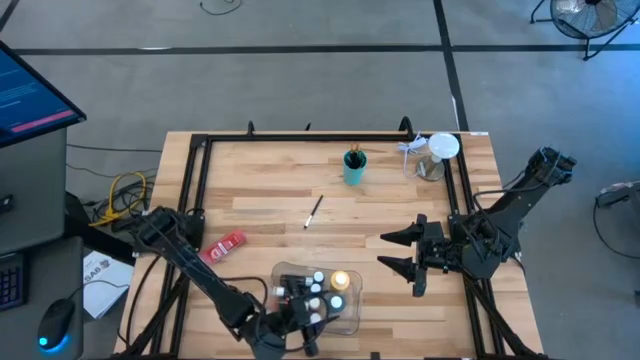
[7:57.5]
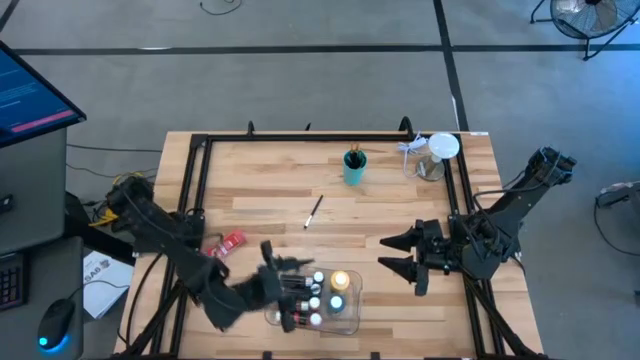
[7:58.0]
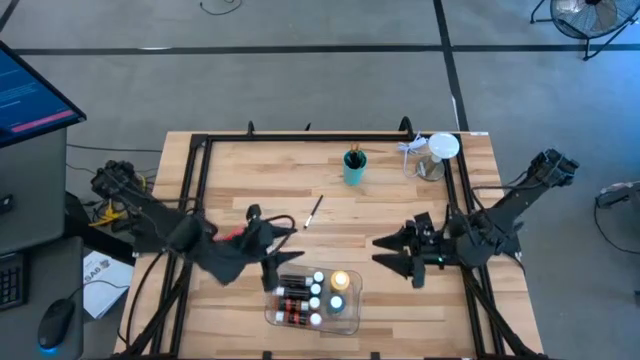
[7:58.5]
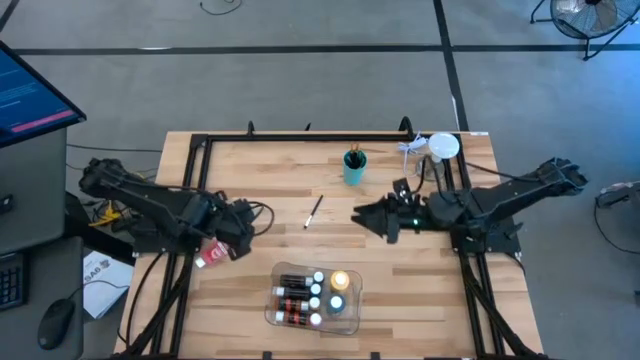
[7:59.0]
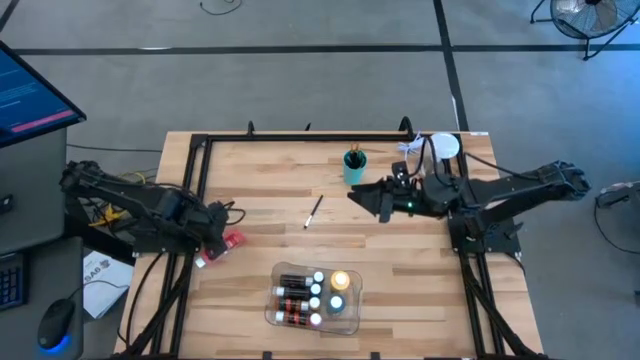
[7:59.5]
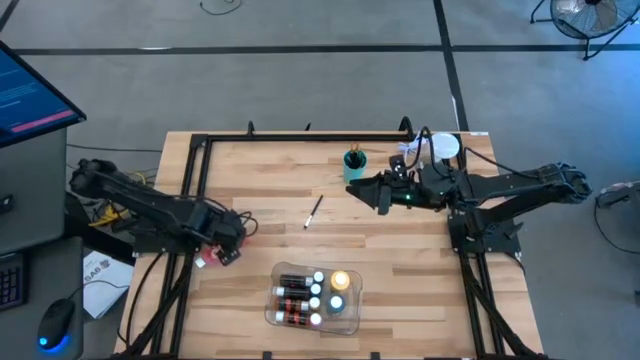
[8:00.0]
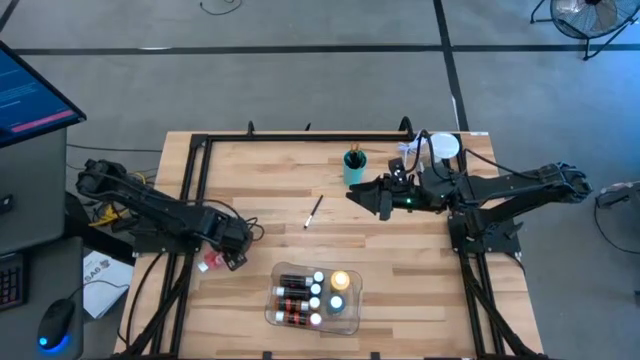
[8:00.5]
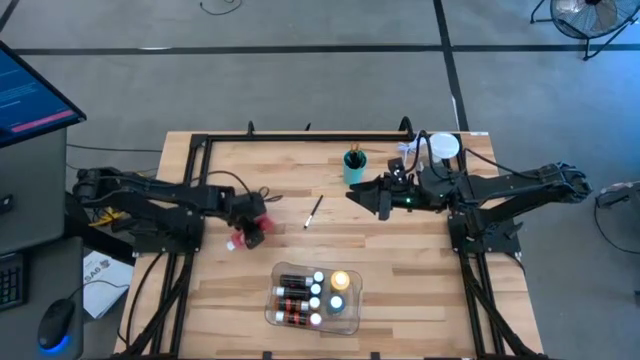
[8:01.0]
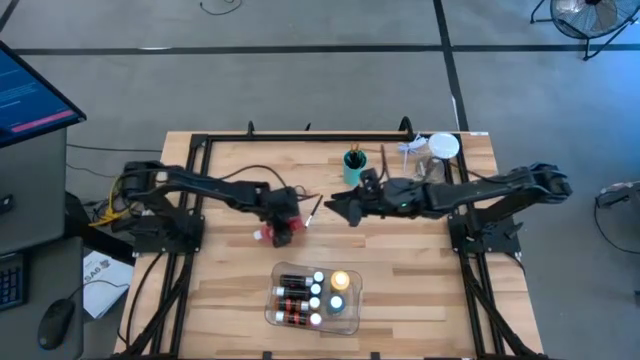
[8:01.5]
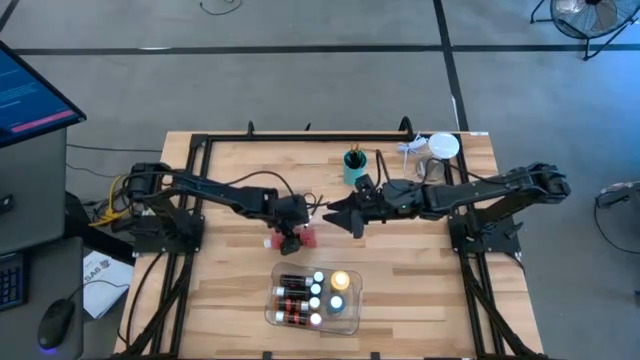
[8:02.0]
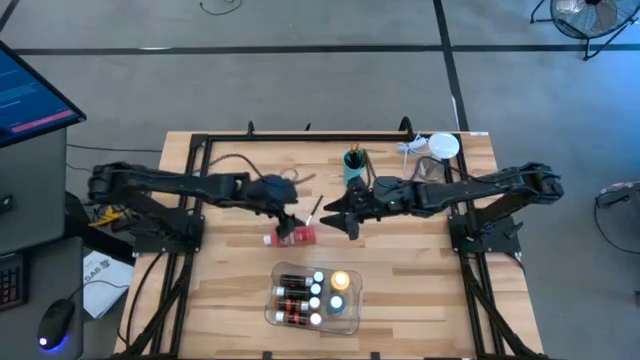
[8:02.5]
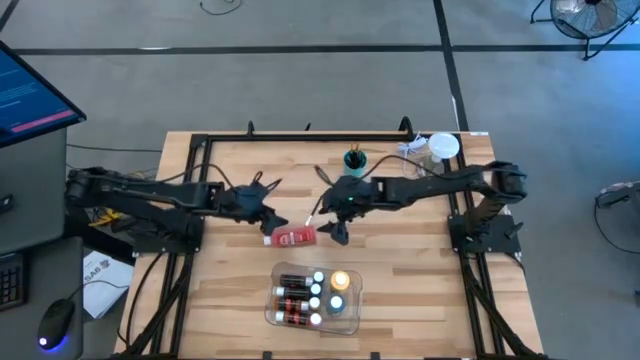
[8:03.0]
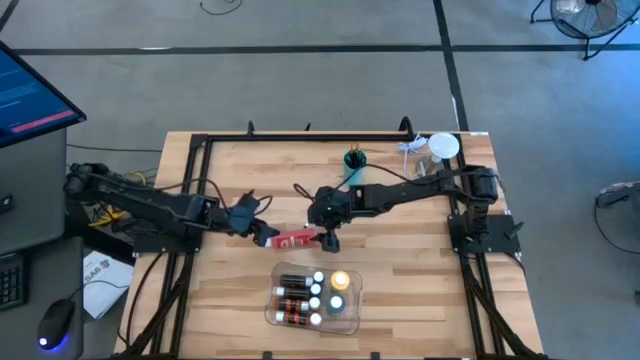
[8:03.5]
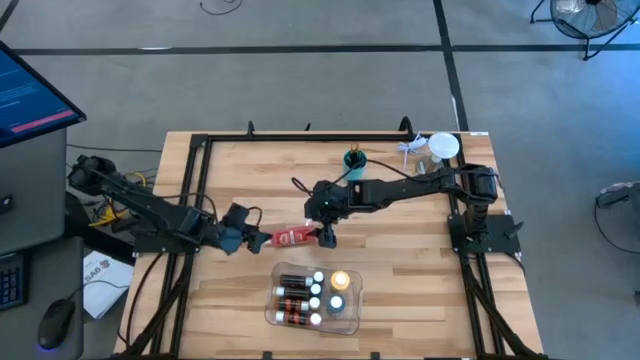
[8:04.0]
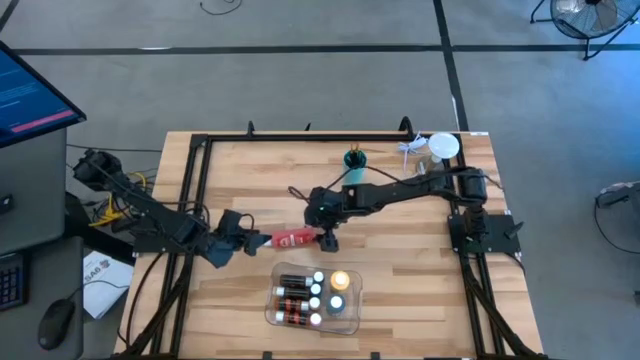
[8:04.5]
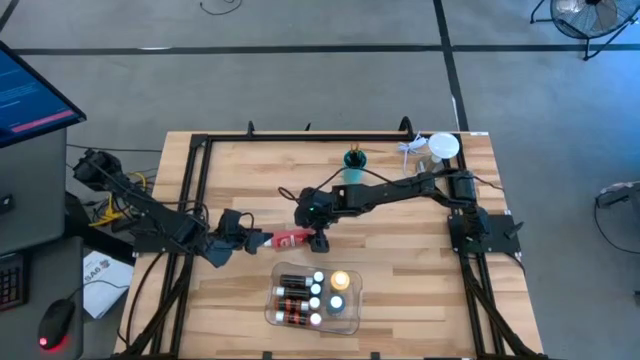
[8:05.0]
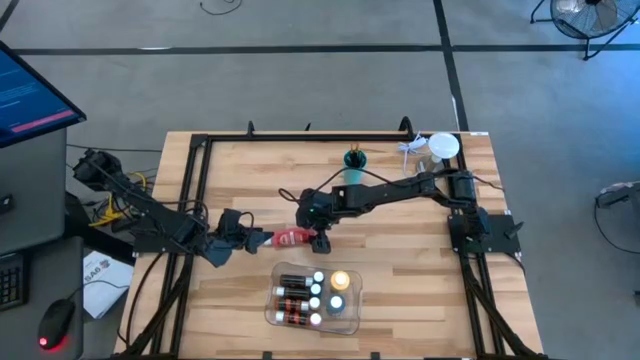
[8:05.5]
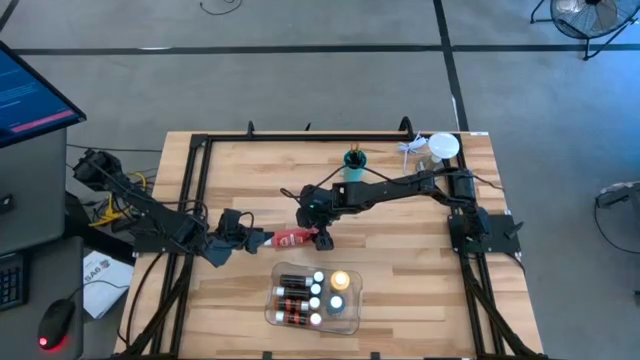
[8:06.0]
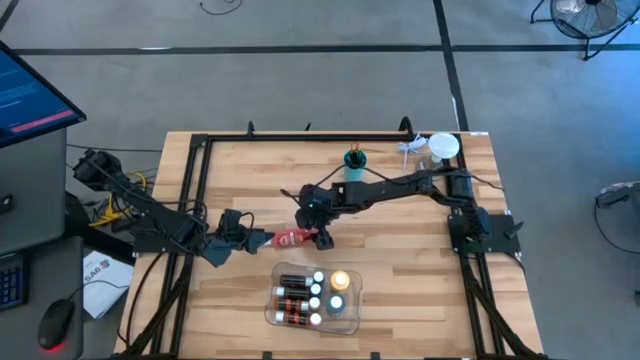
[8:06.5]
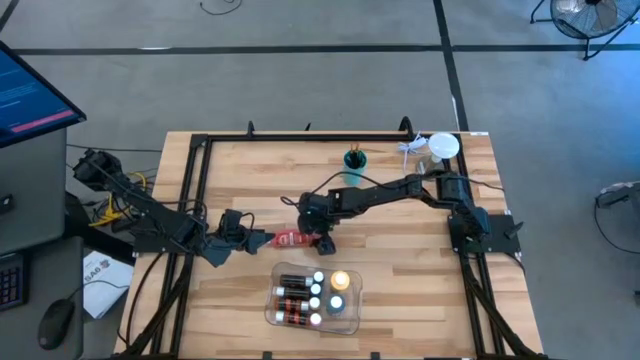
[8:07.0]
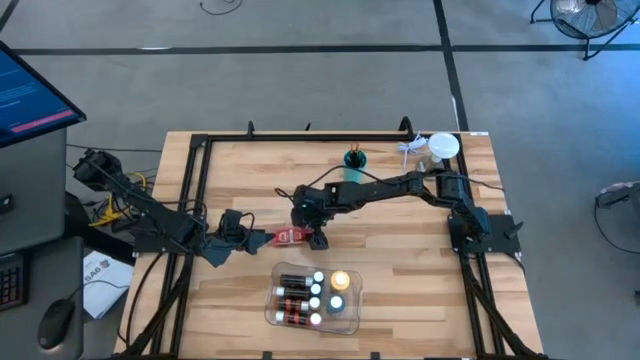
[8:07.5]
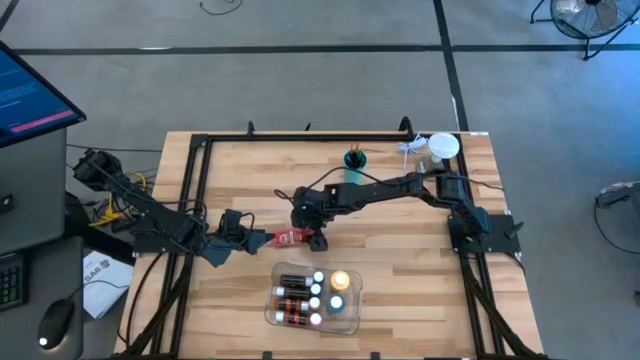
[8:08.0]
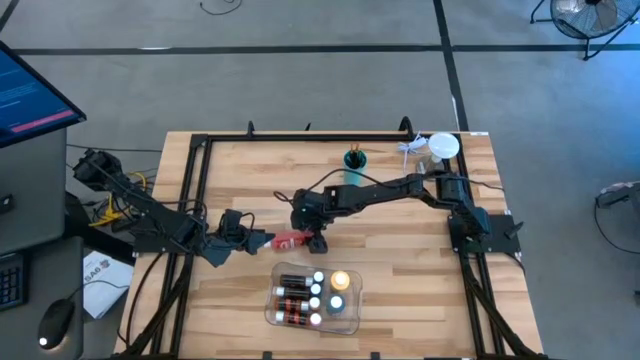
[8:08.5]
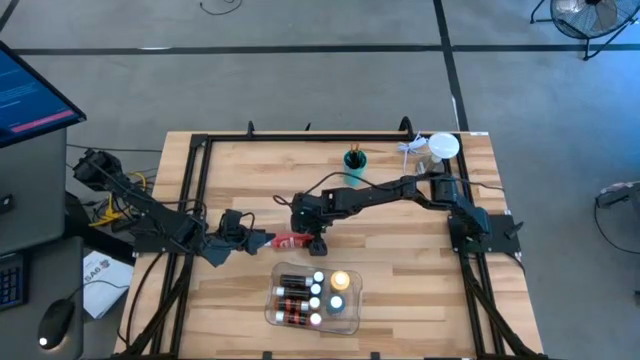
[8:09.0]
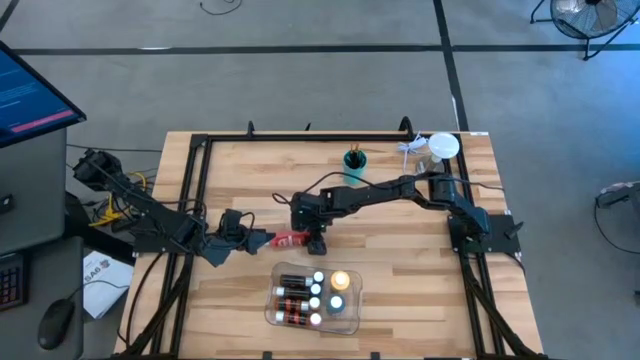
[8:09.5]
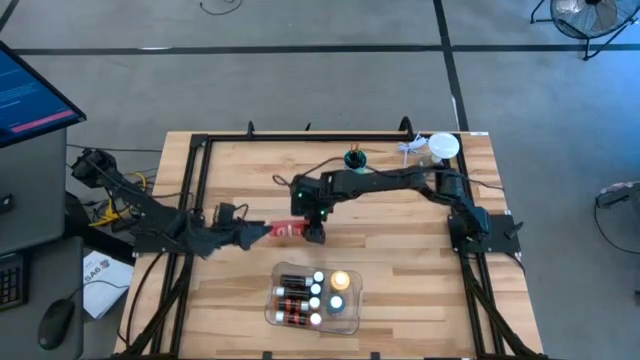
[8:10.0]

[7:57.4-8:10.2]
Task: Pick & Place Paint Supplies
Put the red paint bottle into the transparent bin

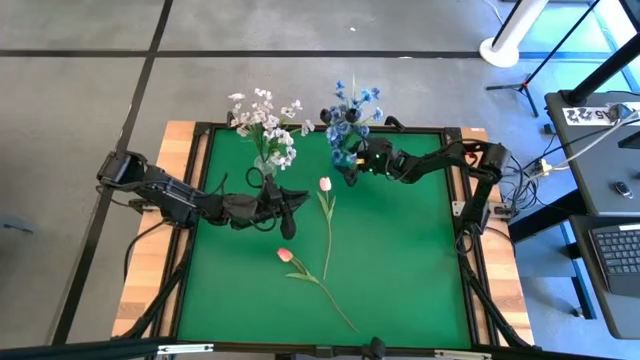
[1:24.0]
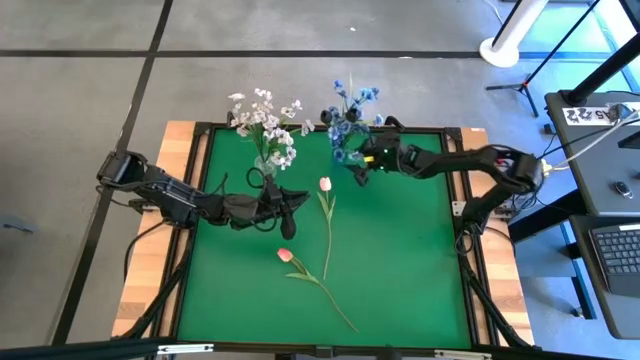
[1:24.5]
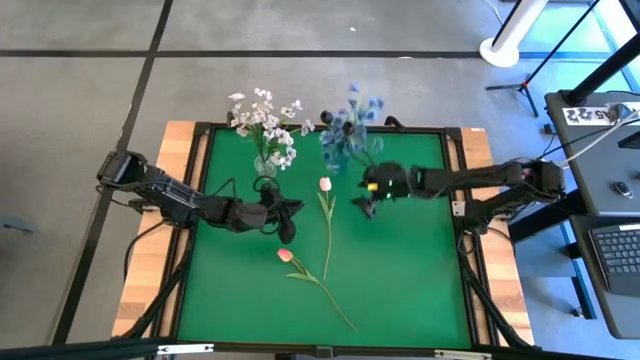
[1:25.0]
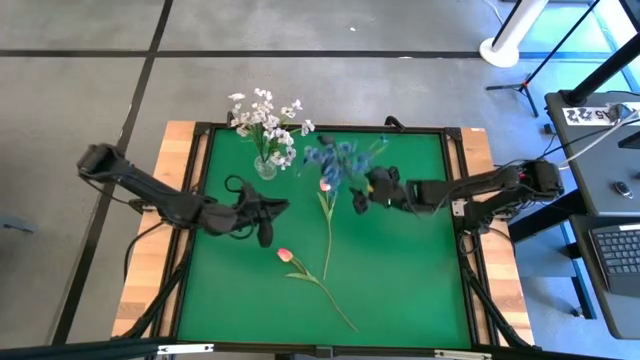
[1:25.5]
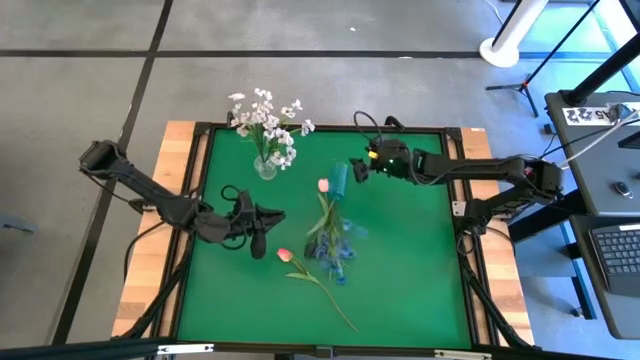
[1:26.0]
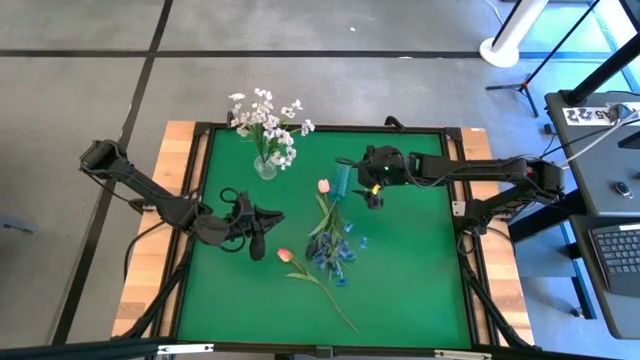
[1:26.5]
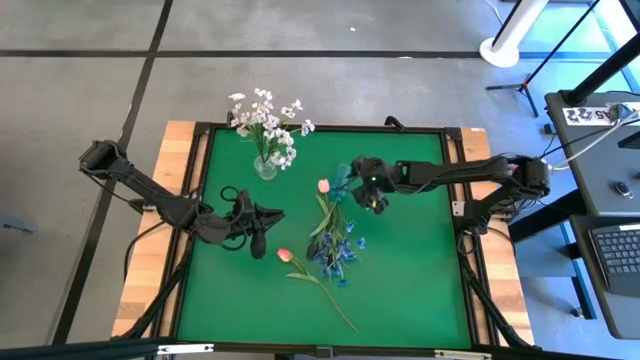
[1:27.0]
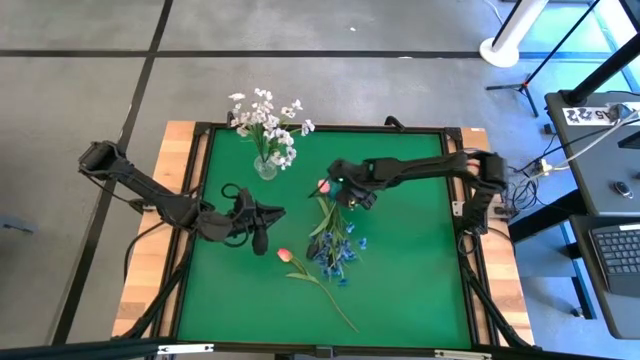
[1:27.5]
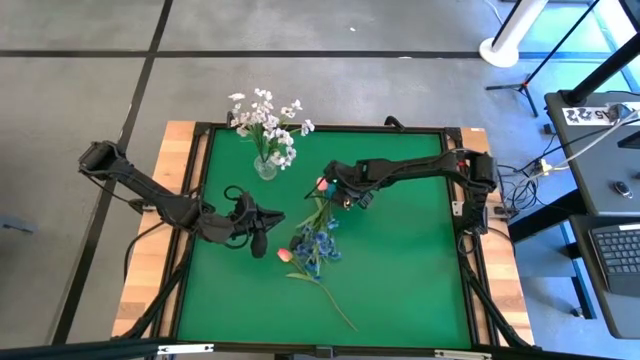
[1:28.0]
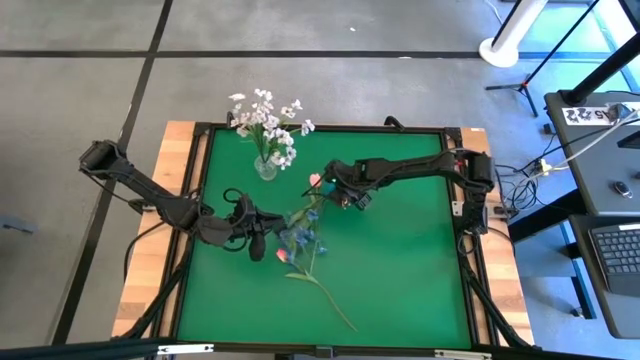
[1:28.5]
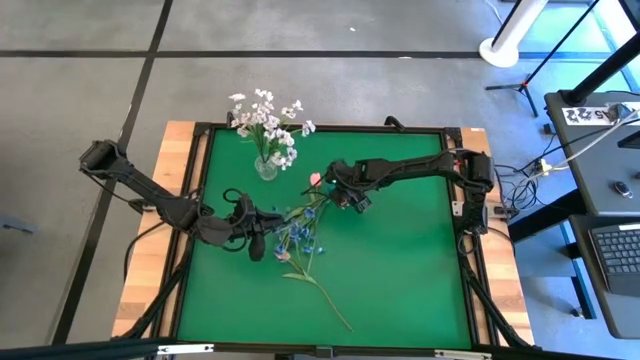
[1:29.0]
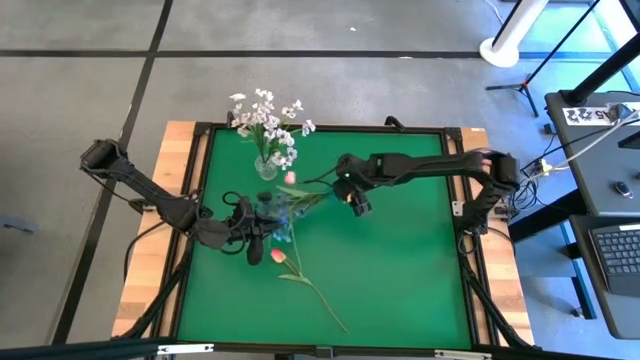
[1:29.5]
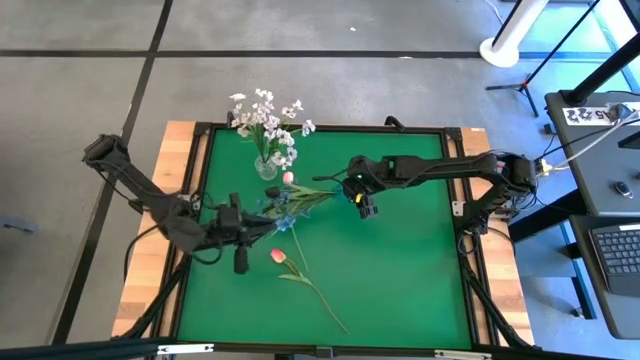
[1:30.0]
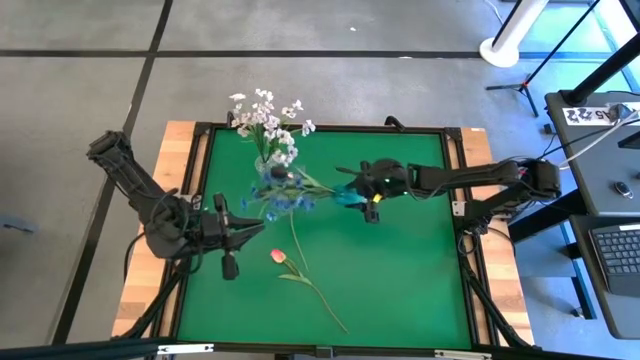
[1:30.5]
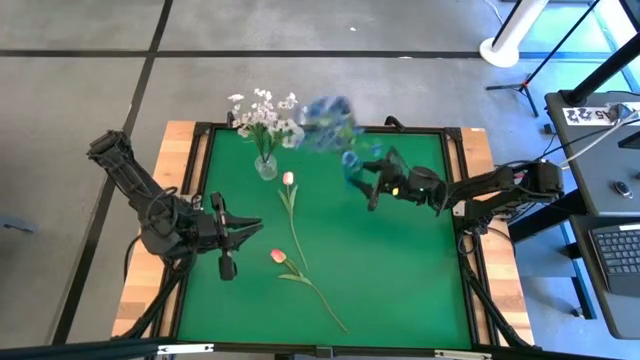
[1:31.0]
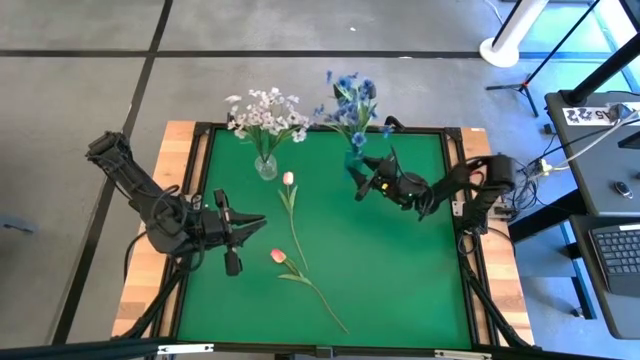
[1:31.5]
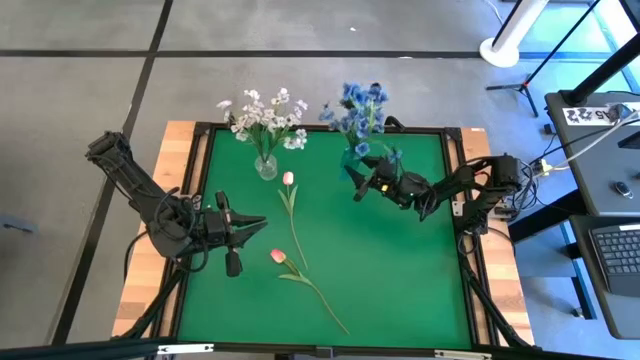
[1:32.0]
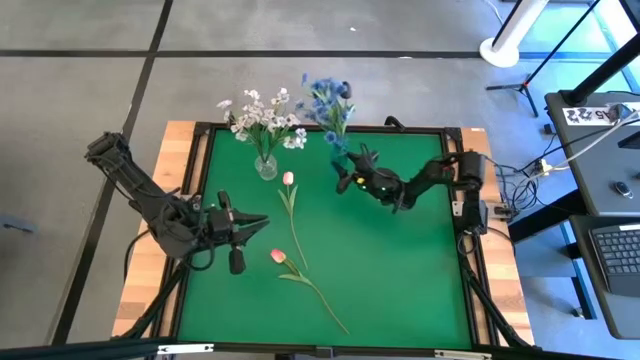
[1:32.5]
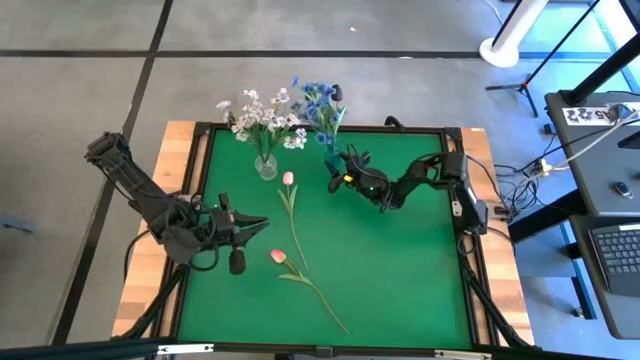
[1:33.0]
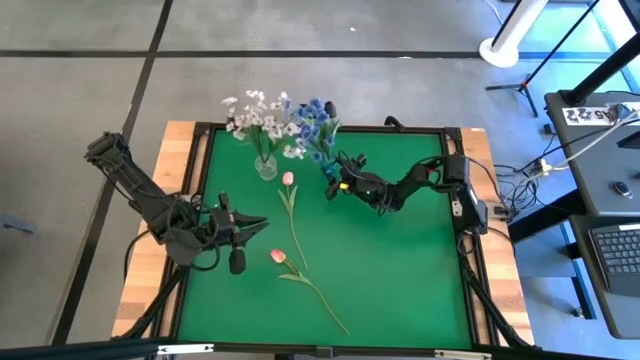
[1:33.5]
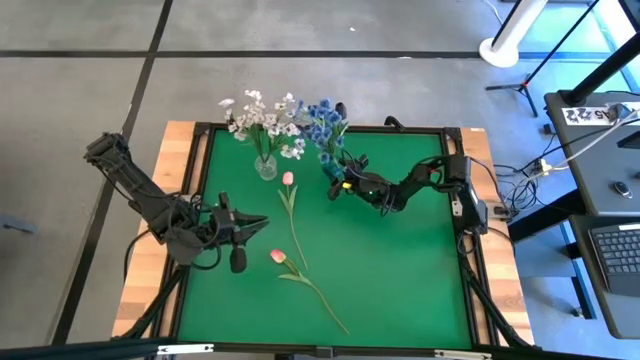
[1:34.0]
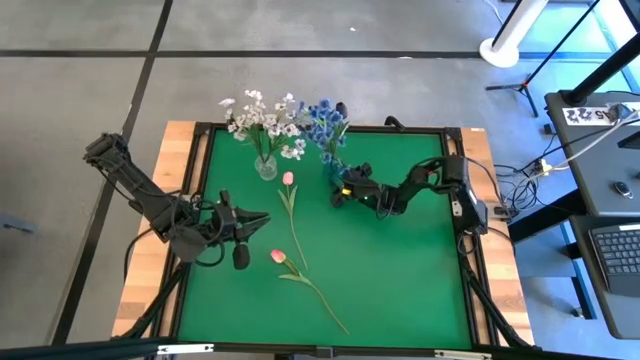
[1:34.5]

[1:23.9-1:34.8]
Task: Sort flowers into vase by color
Adjust the blue vase
